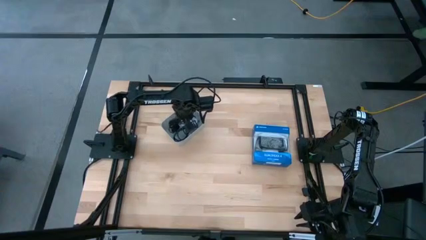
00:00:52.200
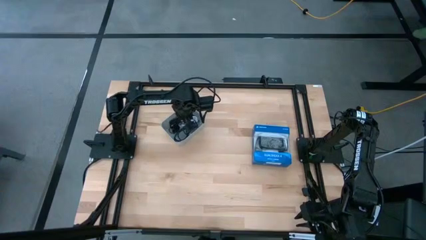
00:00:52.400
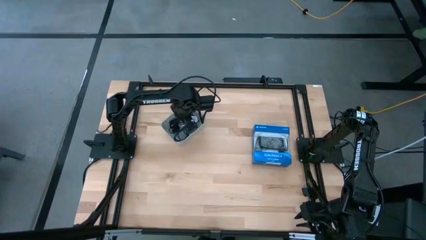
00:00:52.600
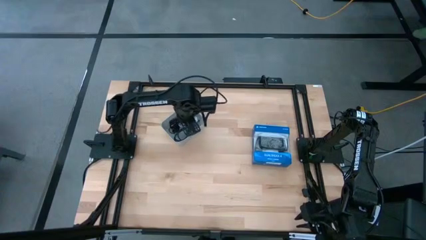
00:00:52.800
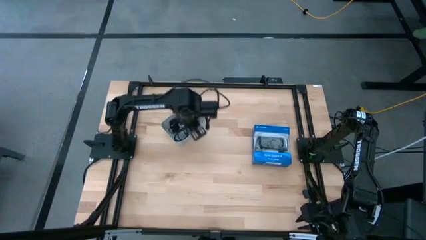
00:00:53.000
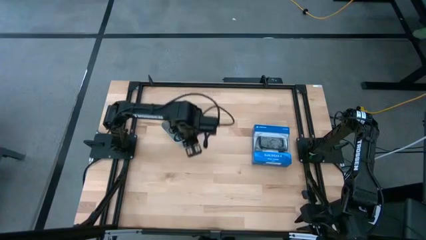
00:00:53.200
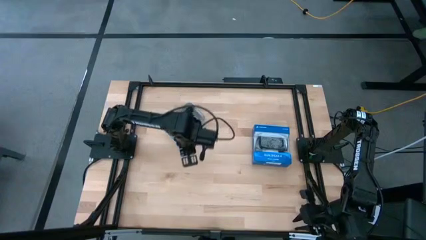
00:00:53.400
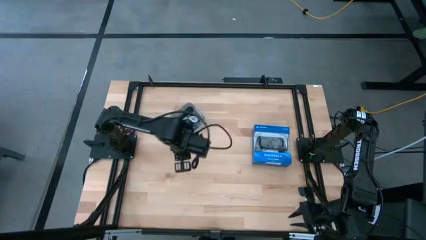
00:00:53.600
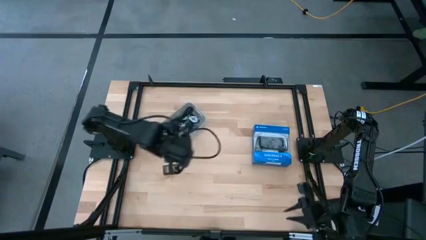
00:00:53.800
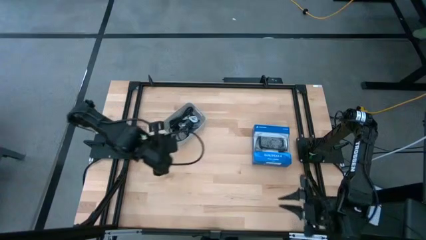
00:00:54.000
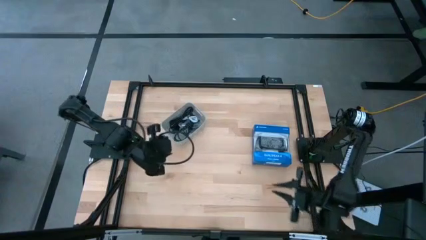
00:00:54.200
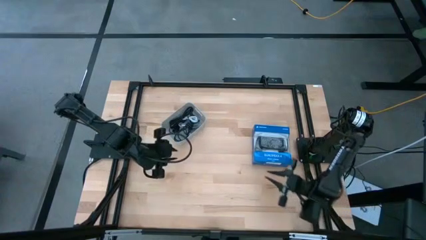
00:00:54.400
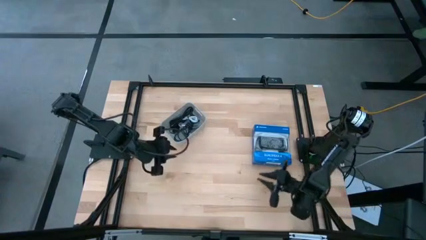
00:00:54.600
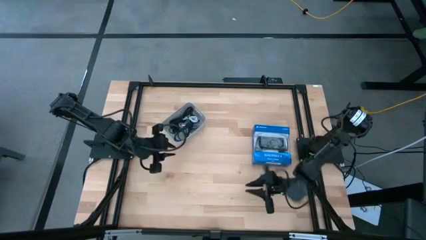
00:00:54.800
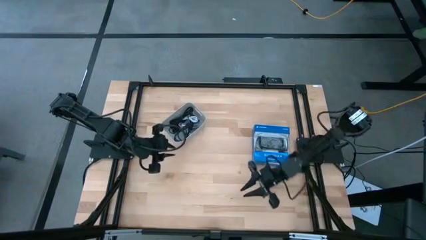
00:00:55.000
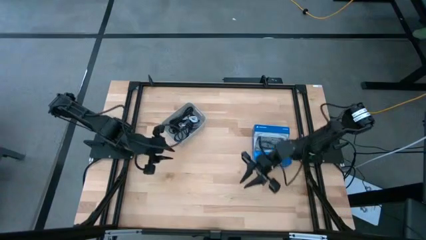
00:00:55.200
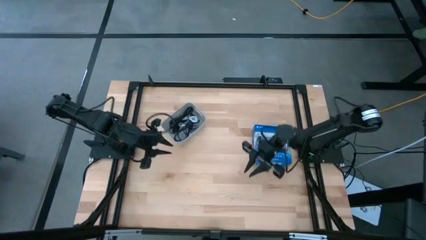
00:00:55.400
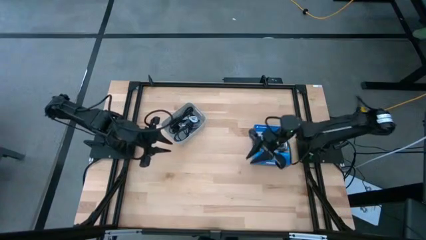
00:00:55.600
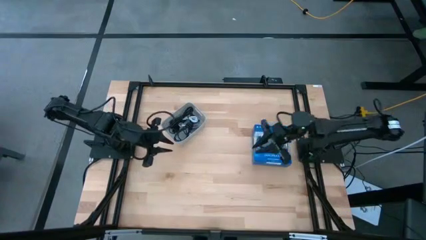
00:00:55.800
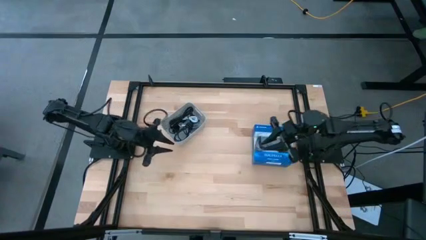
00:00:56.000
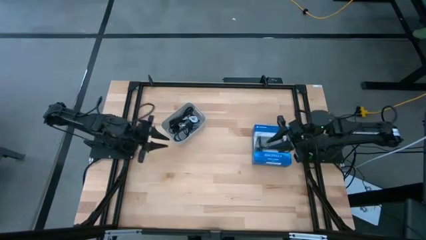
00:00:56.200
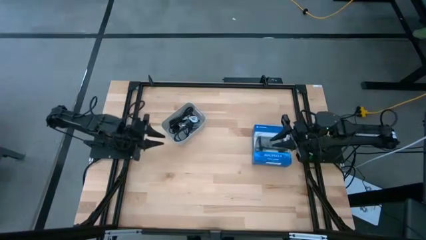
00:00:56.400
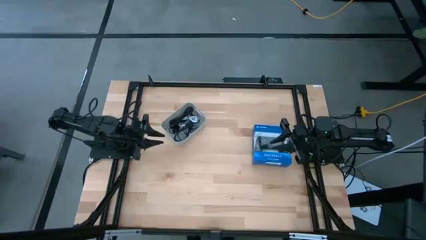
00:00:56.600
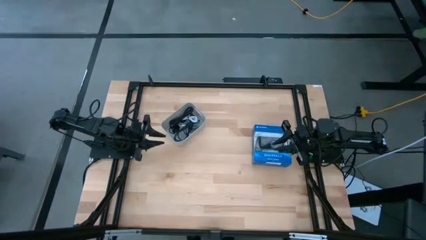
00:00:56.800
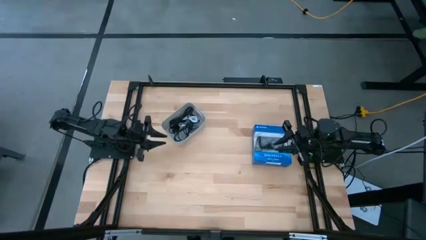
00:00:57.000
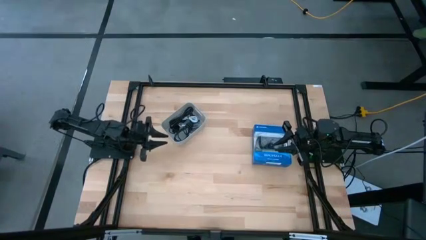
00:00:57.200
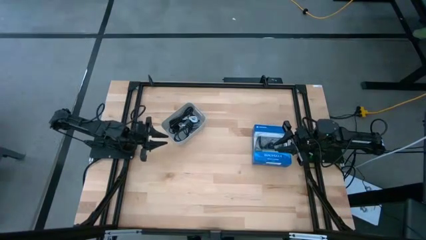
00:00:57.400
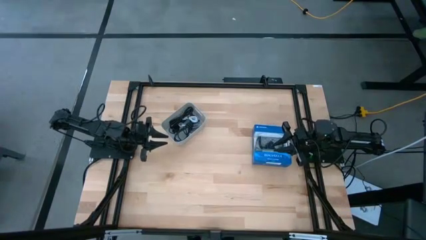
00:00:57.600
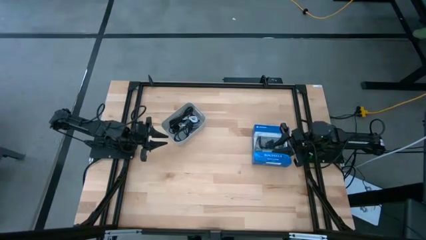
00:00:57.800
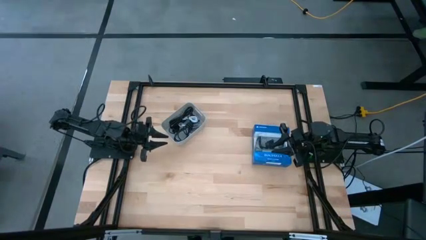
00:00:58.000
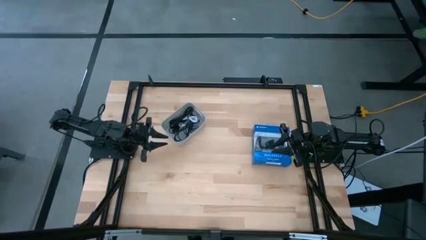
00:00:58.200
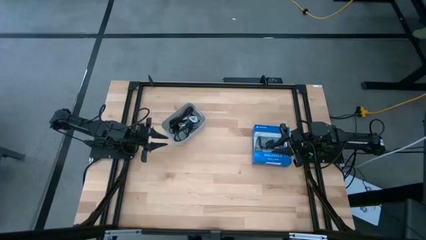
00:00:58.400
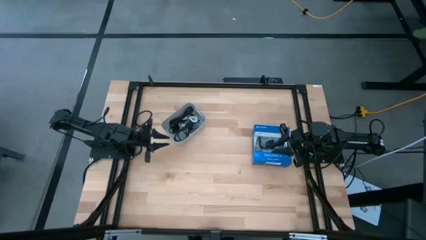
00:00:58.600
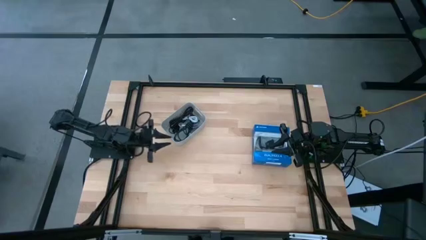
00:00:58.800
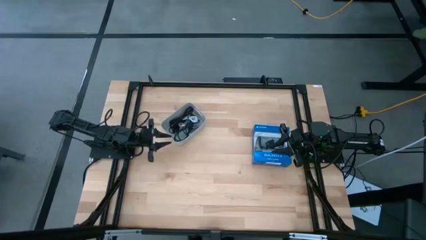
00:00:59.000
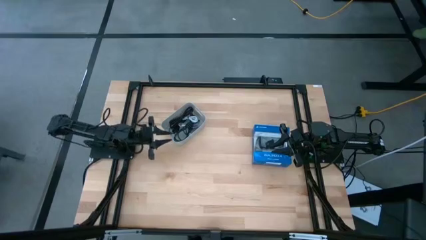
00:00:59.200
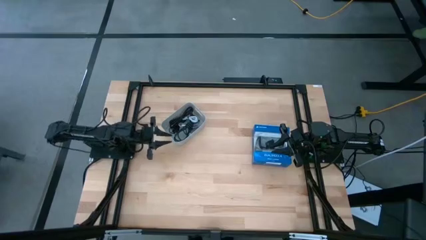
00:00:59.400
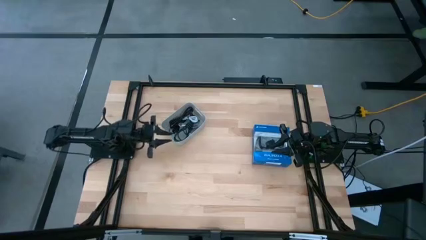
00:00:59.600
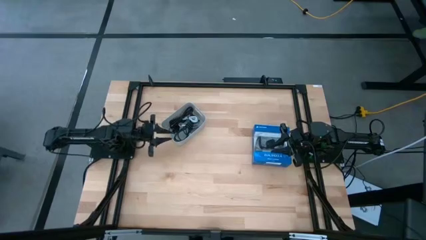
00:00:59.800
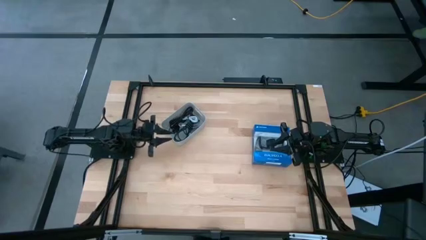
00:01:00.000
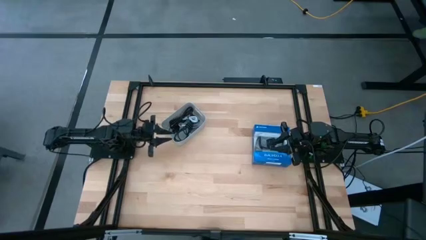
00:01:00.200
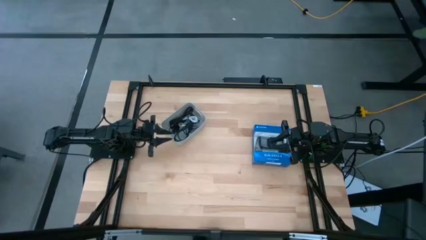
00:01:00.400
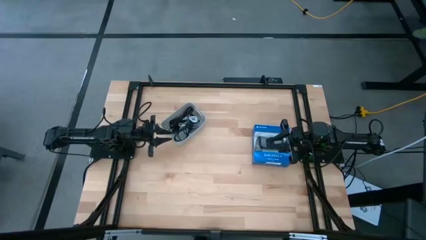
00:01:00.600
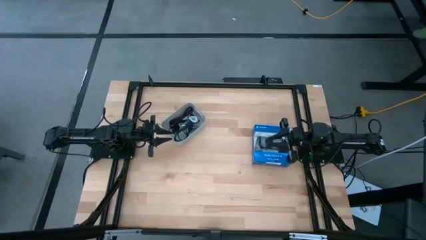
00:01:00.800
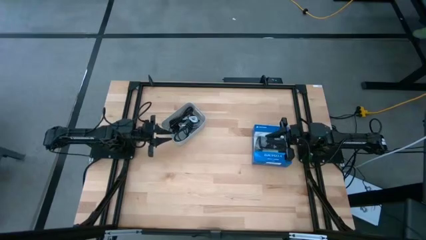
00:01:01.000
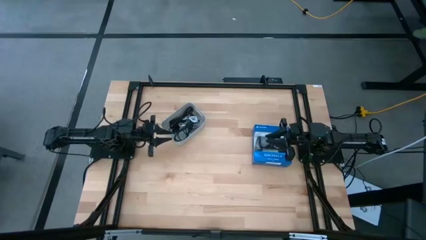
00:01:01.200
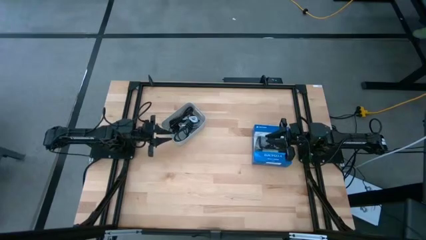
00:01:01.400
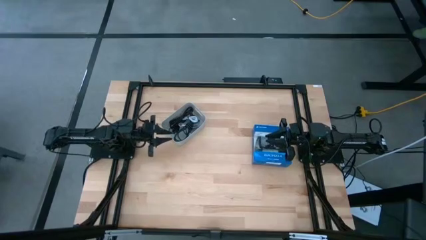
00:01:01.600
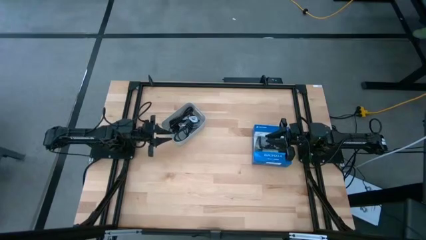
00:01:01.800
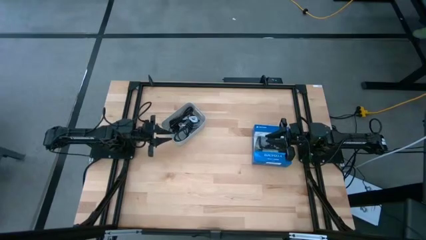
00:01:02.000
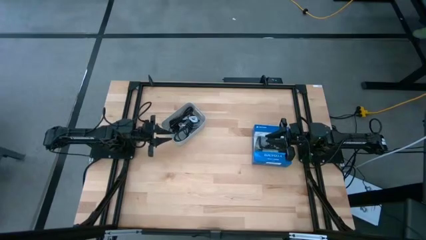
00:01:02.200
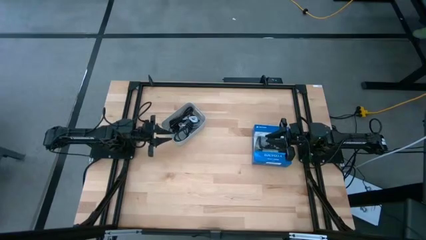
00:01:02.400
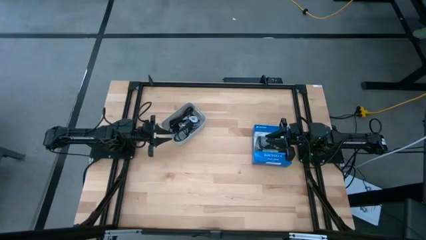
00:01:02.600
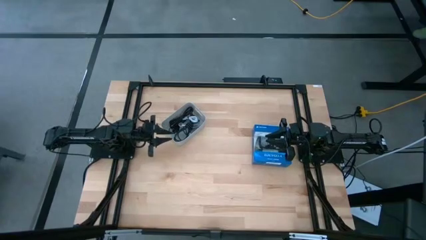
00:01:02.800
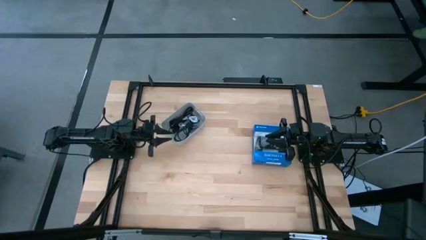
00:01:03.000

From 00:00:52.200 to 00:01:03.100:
Task: Pick and place USB-C Cables
Return to Home Position

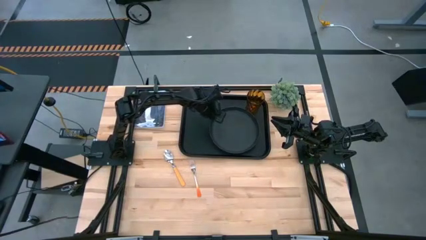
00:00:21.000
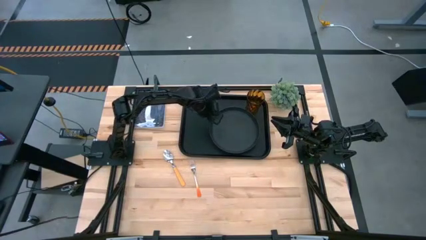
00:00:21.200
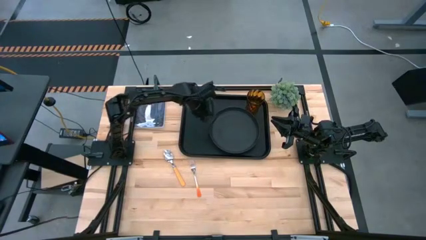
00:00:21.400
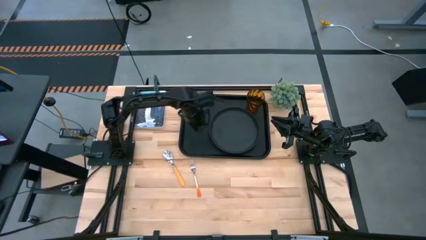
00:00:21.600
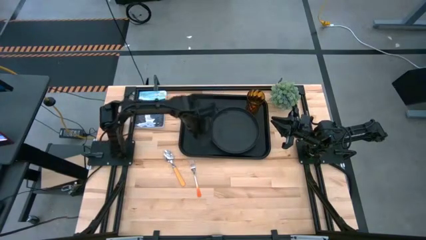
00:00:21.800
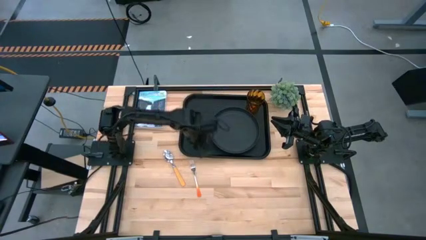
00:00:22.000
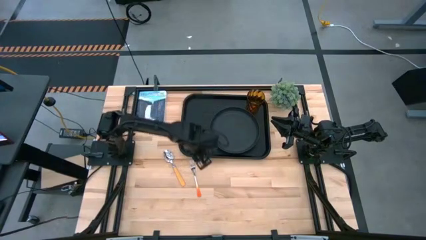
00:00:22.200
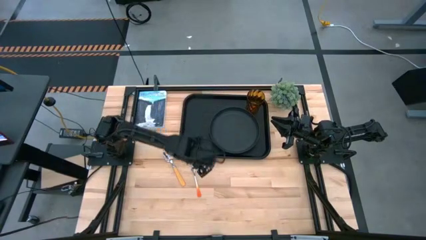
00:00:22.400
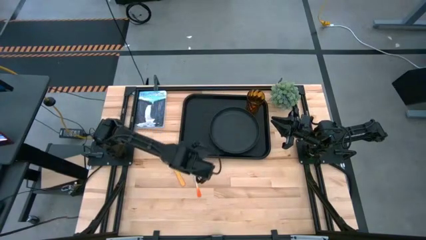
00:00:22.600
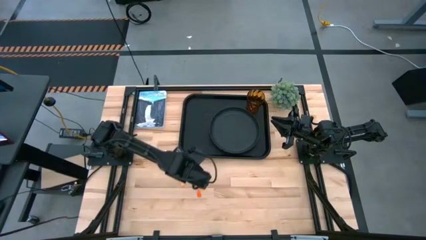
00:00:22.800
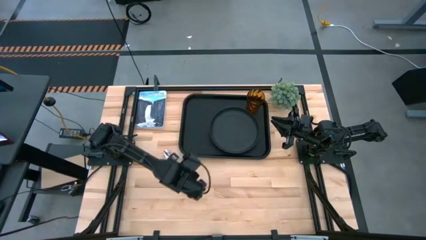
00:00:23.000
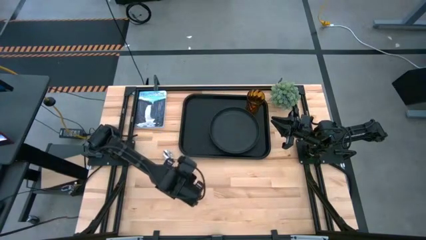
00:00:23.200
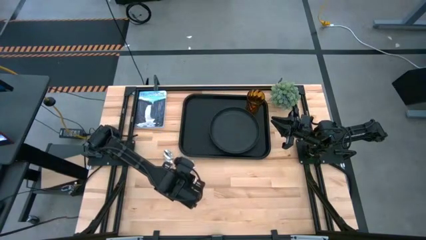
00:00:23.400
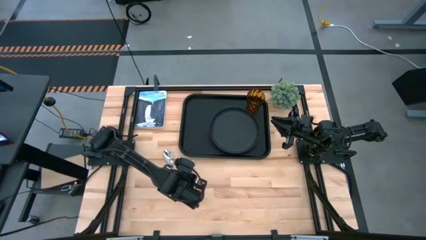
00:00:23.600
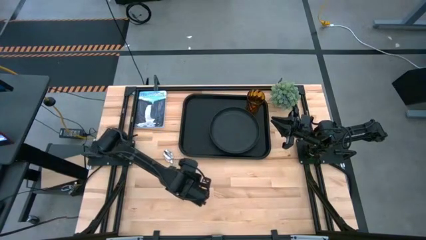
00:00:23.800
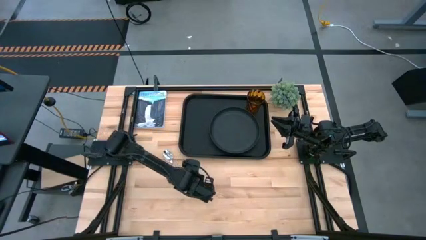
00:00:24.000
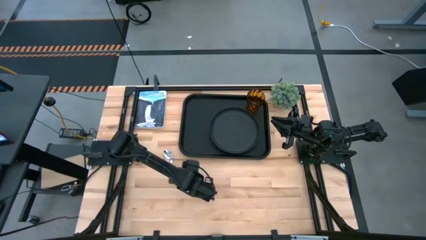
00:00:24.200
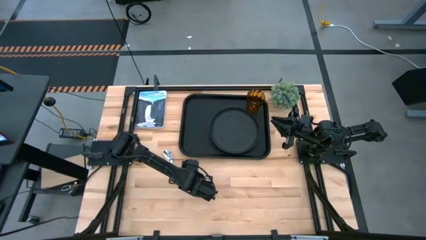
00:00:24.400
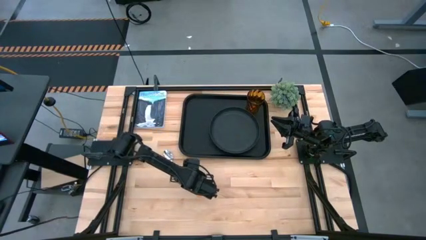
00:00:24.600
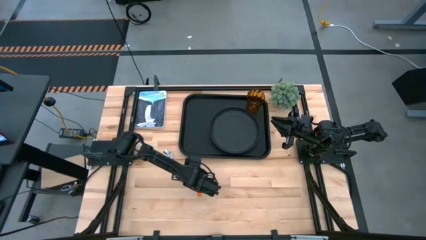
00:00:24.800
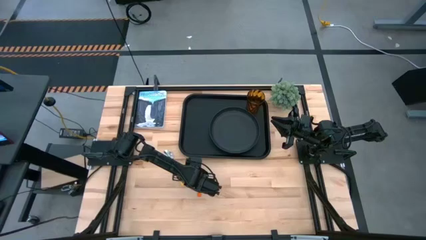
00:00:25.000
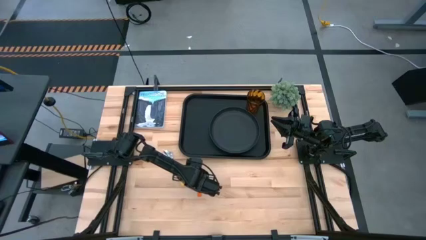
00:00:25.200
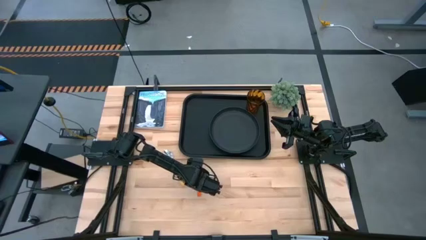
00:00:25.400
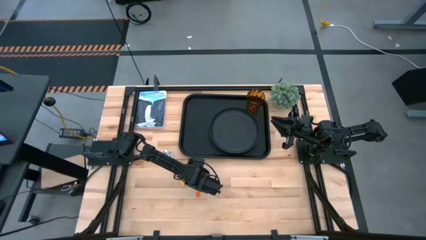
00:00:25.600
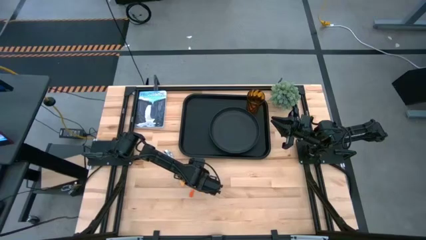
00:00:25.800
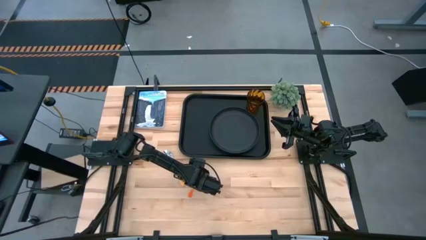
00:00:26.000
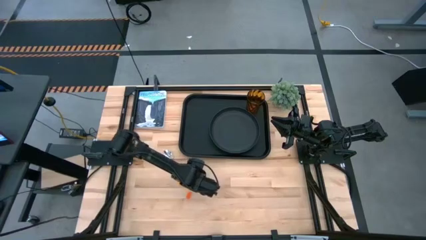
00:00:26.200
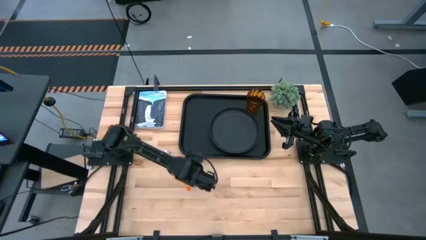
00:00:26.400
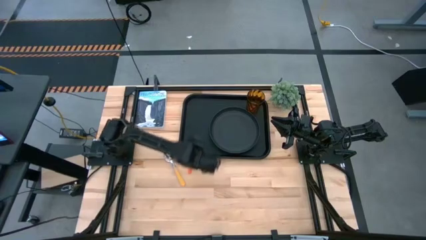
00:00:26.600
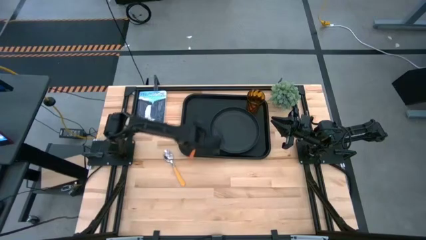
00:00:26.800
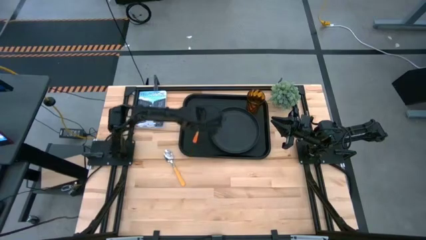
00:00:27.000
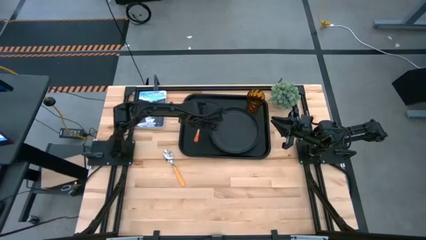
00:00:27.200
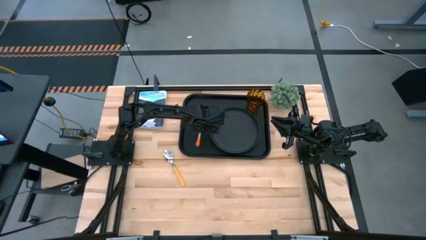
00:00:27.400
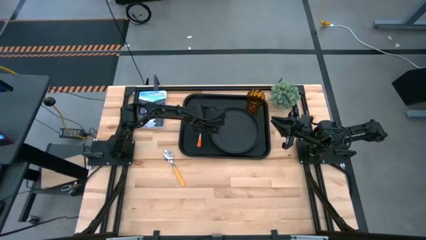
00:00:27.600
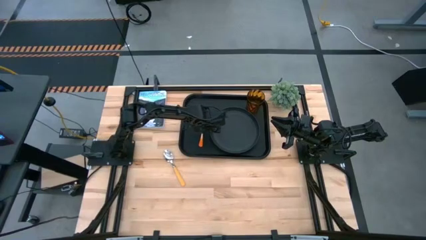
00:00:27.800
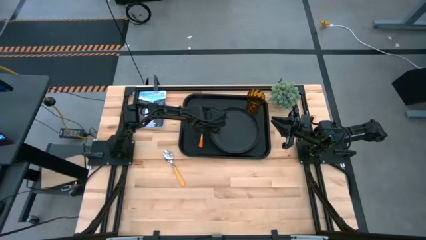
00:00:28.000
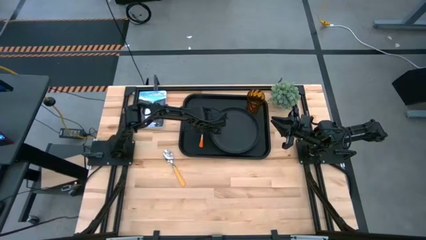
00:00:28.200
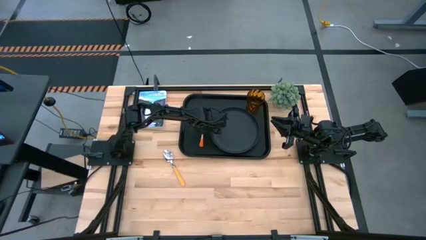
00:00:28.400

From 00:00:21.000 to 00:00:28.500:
Task: Pick and place plate/cup/fork/spoon on tray
Put the orange fork on the black serving tray to the left of the black plate
